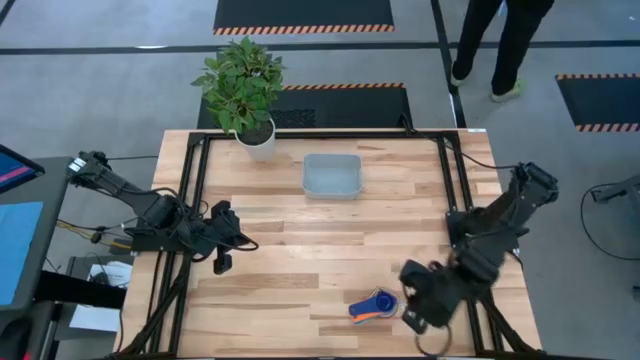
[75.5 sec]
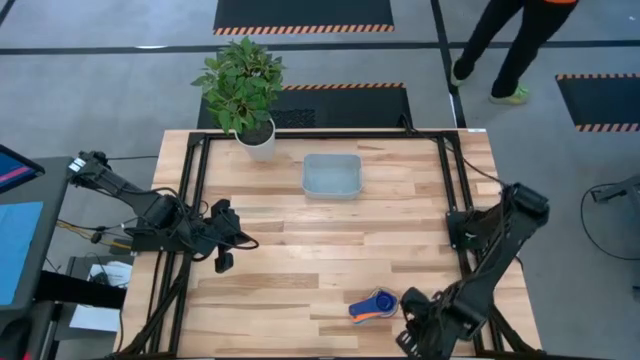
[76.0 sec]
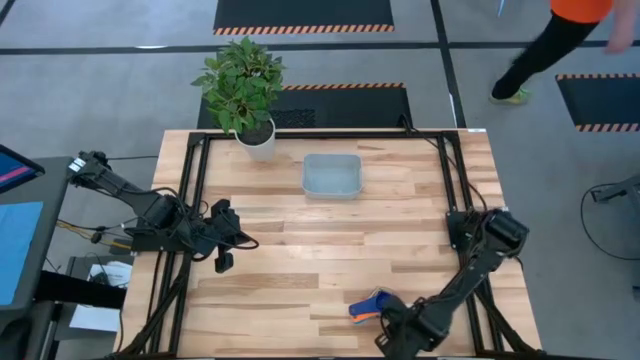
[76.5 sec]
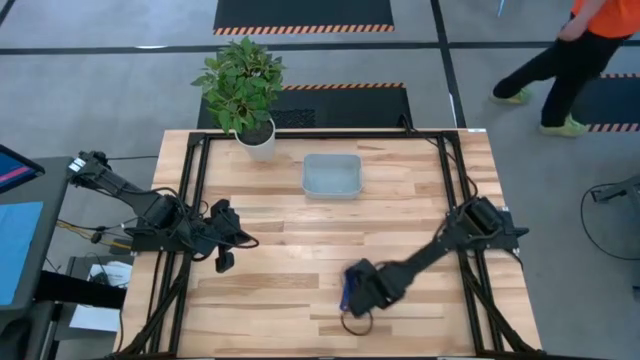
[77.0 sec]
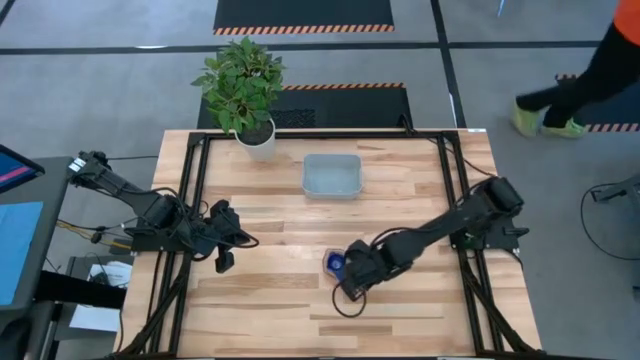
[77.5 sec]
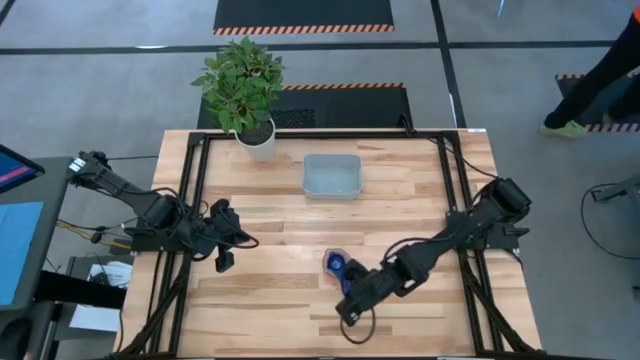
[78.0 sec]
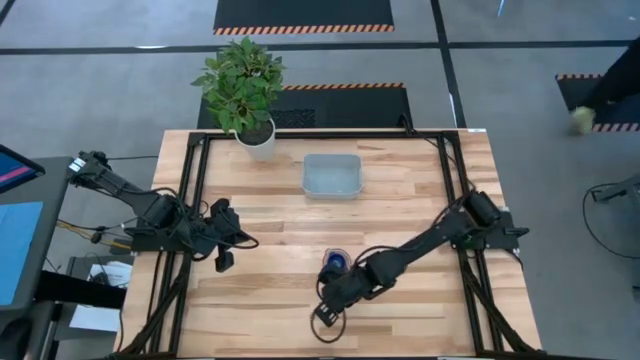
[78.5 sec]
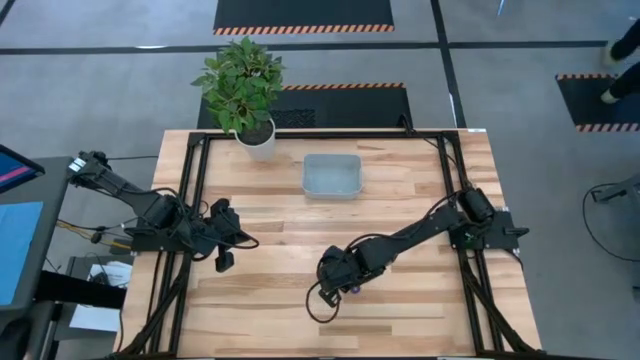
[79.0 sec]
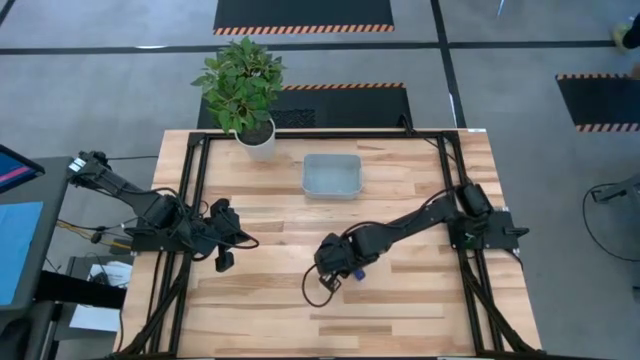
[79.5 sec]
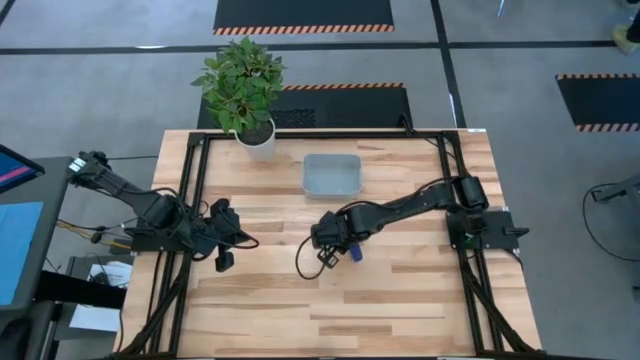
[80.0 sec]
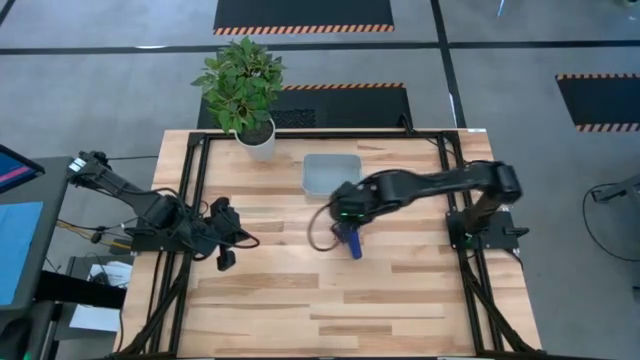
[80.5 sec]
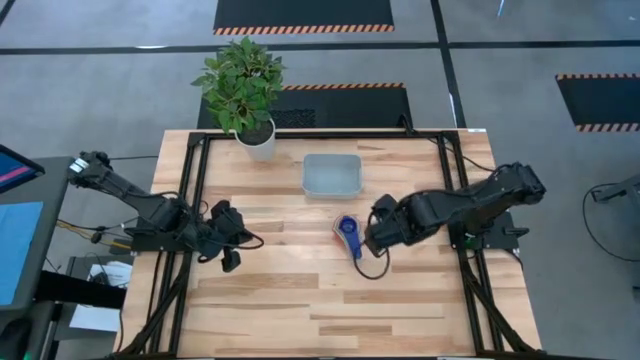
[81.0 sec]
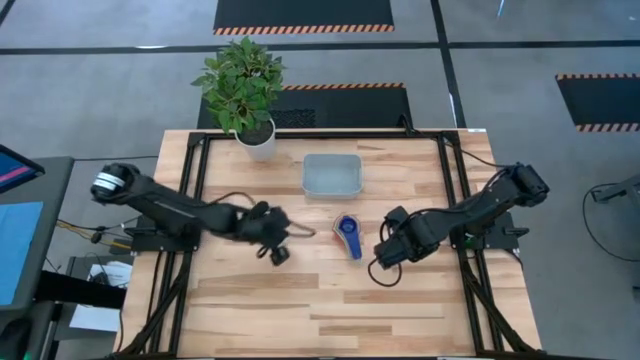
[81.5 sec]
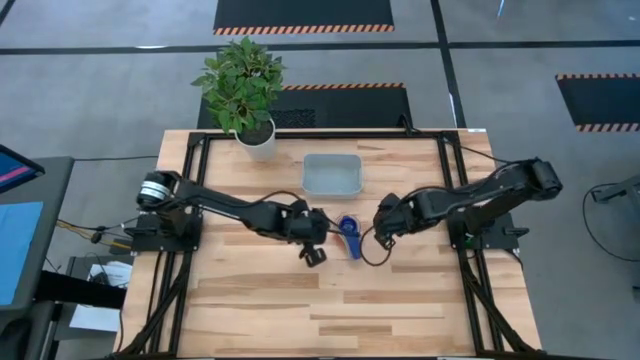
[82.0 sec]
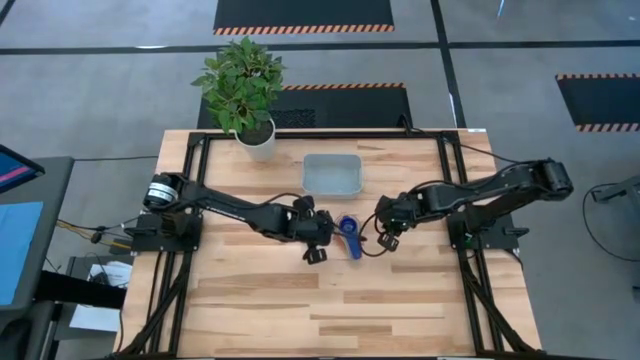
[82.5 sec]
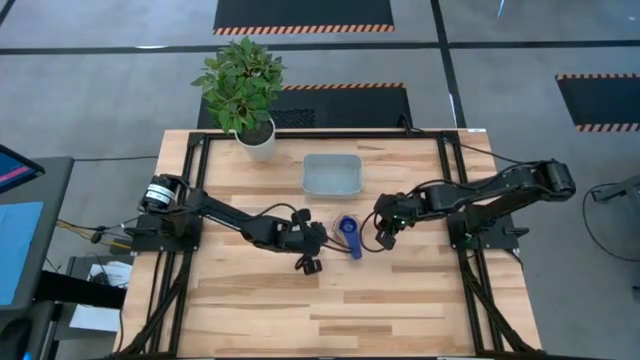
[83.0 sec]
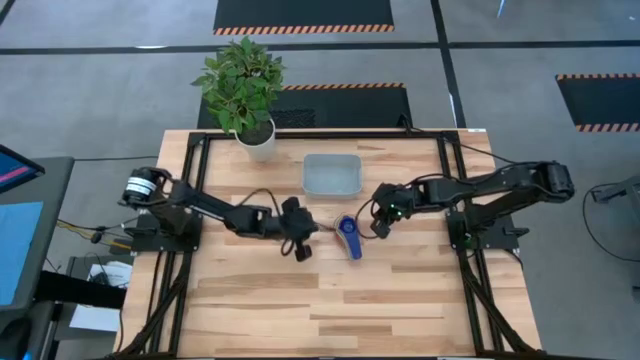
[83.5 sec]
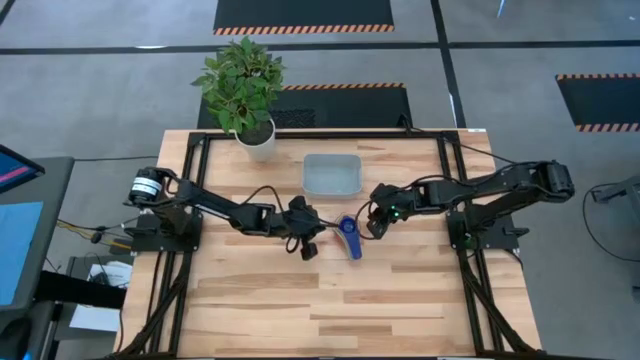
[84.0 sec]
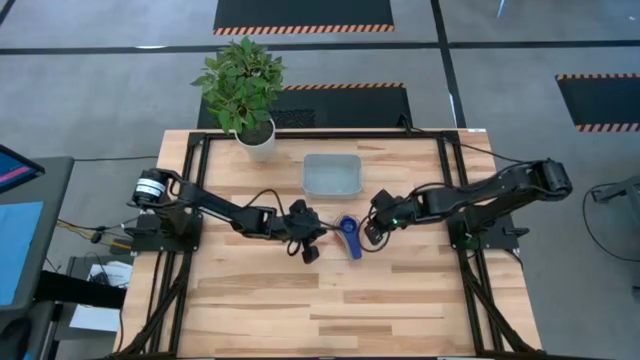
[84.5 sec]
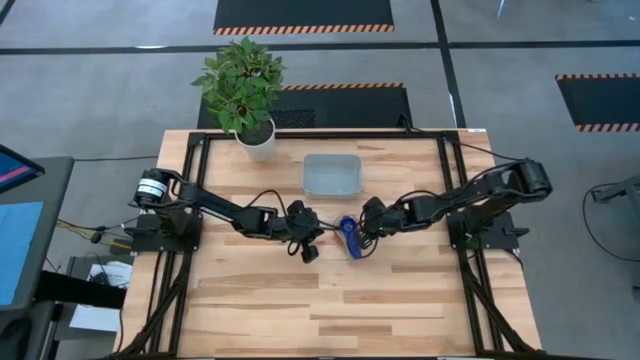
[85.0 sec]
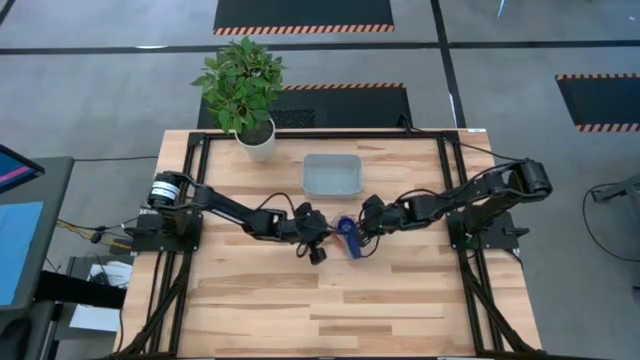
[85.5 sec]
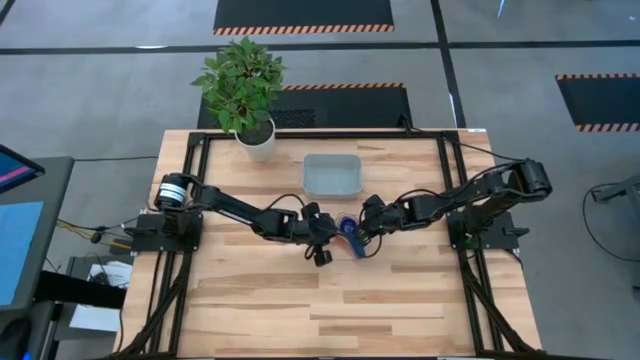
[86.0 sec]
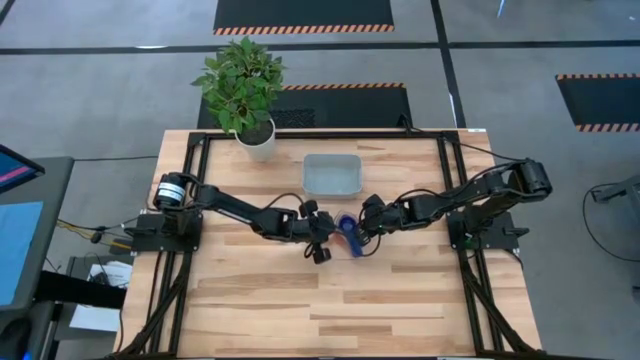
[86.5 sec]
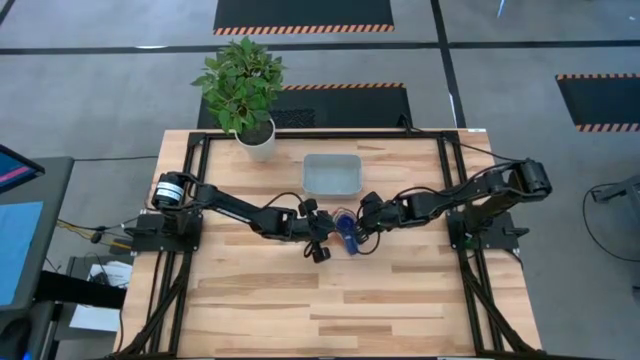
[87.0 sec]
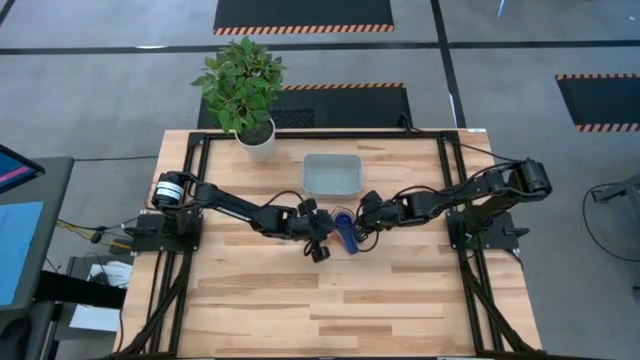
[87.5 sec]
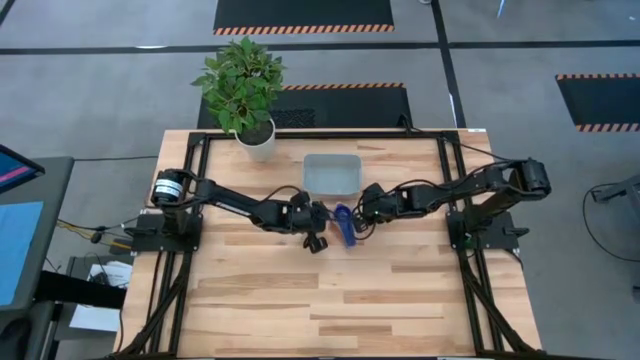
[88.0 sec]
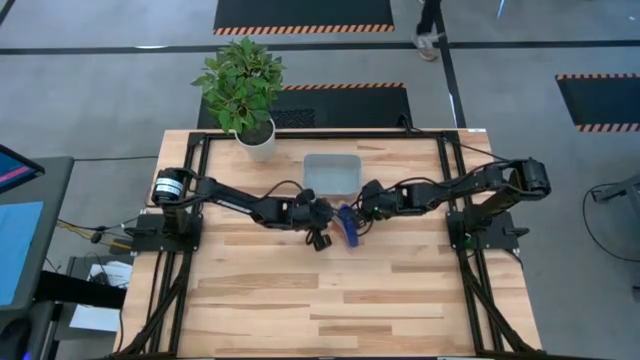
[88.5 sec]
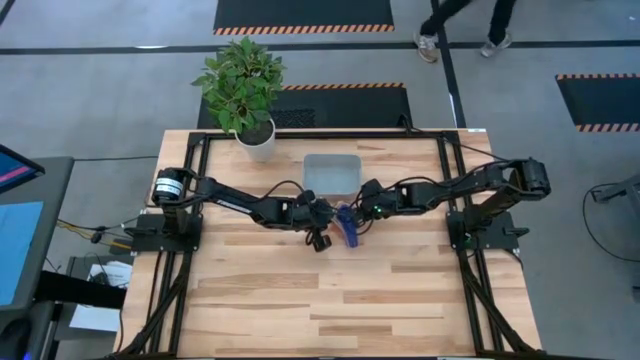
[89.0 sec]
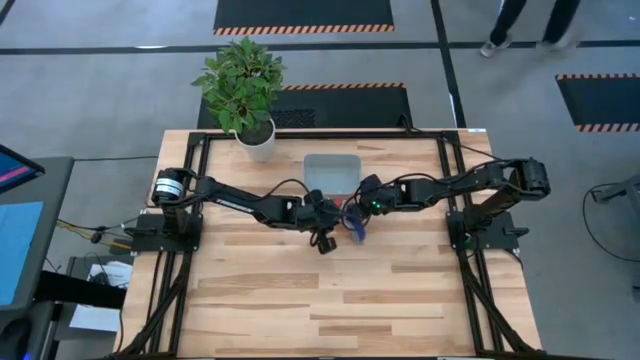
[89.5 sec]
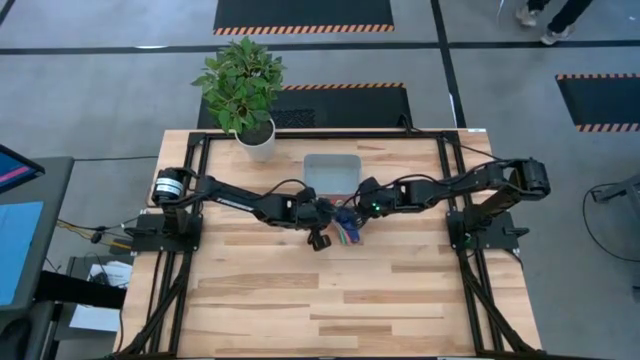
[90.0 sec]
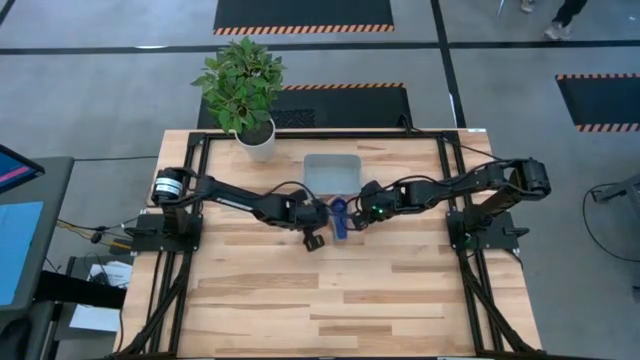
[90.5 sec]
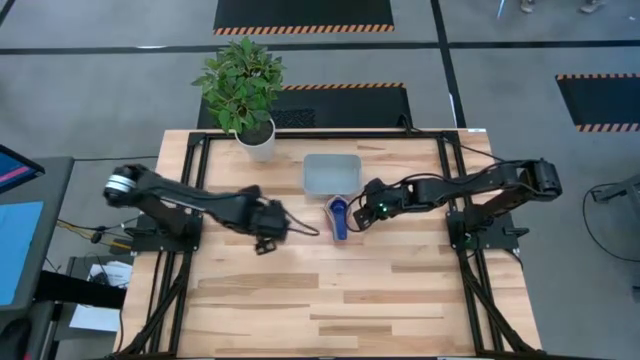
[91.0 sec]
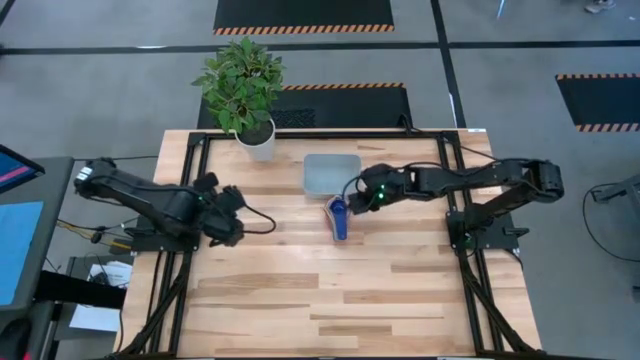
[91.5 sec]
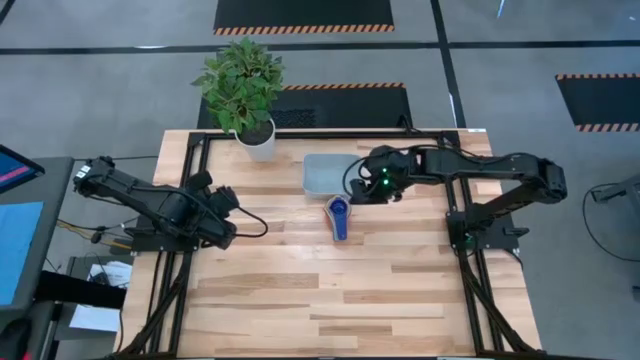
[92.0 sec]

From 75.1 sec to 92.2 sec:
Task: Nest measuring cups in basket
Put the nested measuring cups into the gray bin

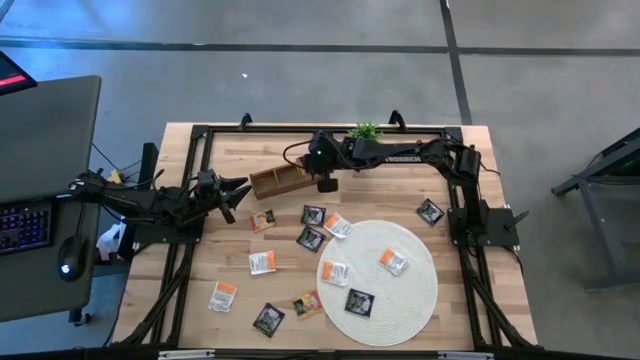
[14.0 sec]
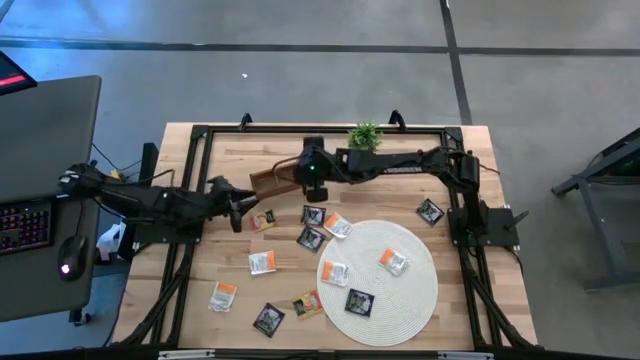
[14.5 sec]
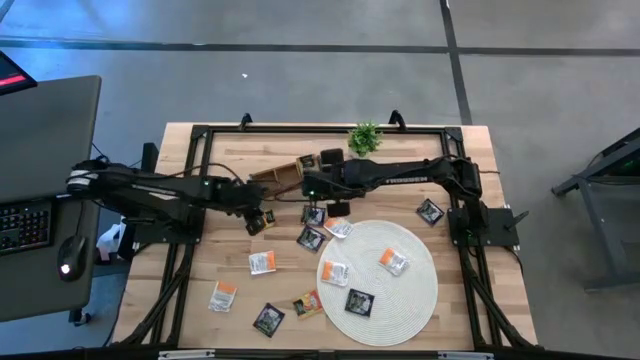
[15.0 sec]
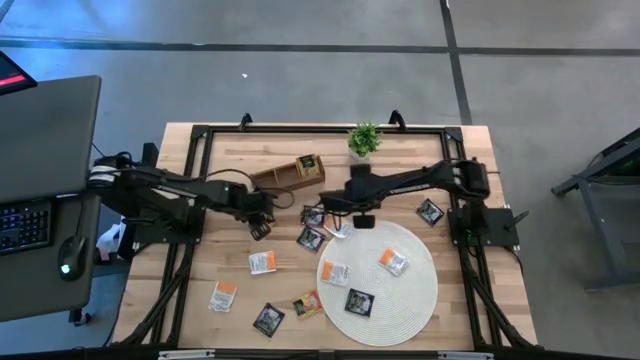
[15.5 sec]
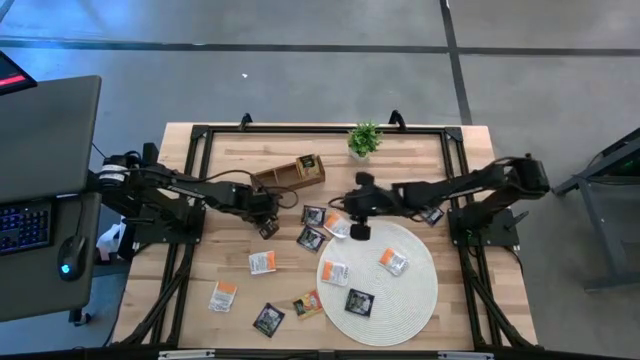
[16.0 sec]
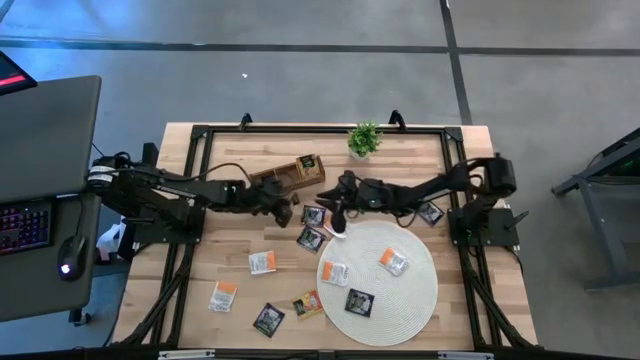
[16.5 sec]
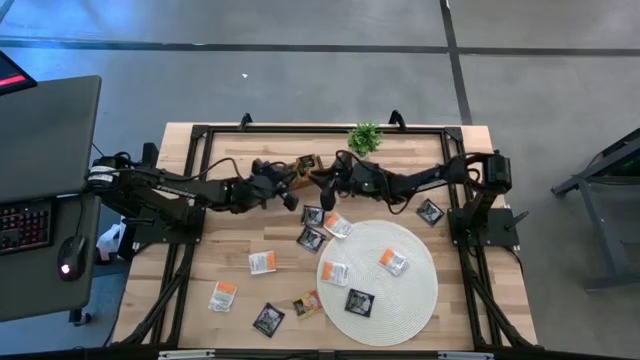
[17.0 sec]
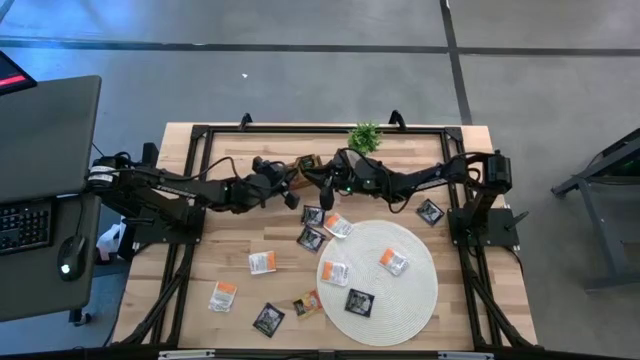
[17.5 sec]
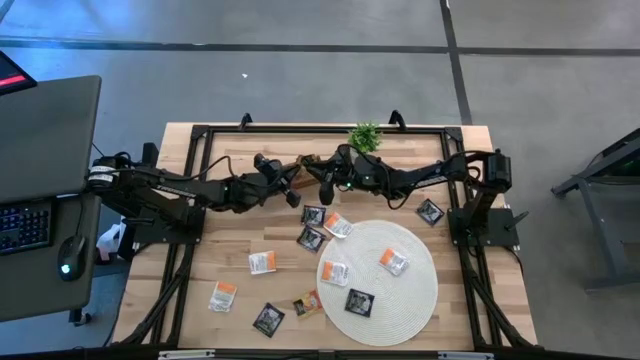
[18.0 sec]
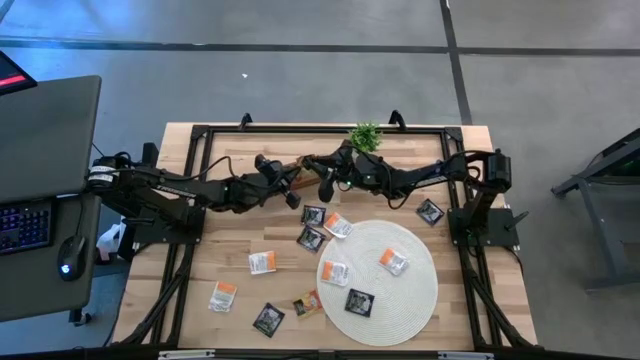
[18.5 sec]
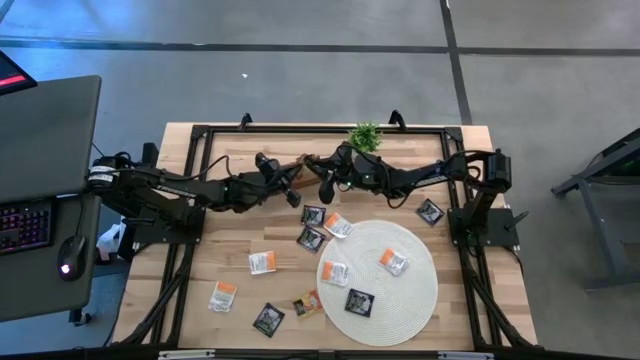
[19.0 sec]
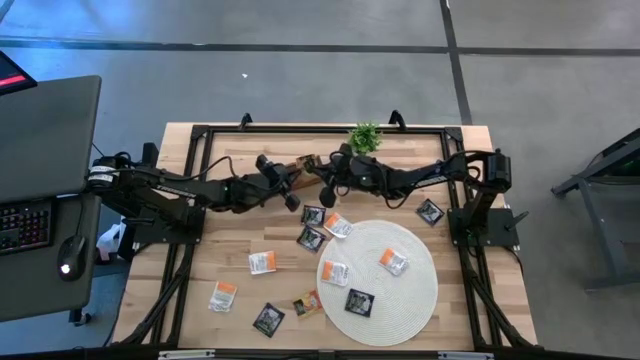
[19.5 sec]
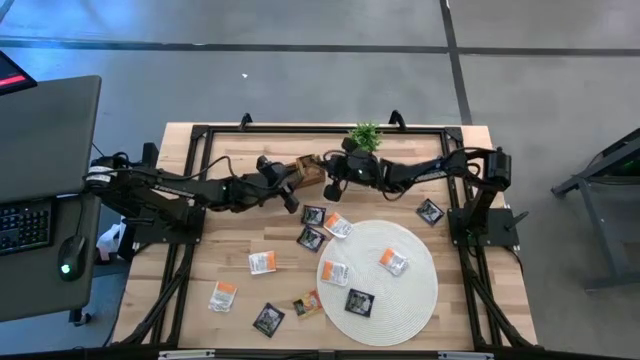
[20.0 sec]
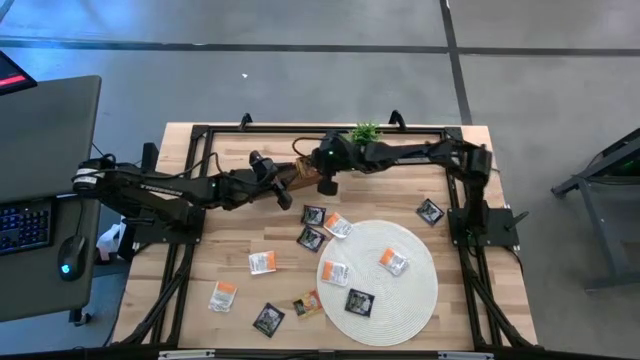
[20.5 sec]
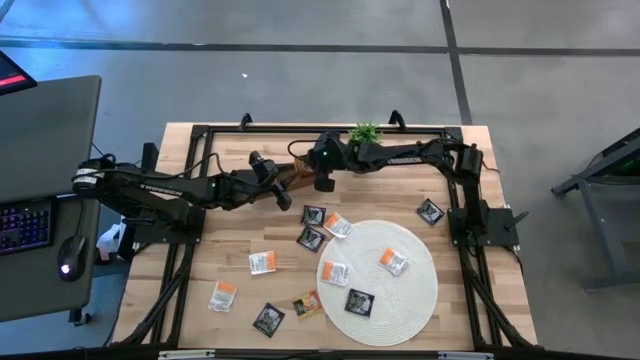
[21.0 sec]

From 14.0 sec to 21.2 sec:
Task: Pick & Place Tea
Put the orange tea bag into the right section of the wooden organizer
